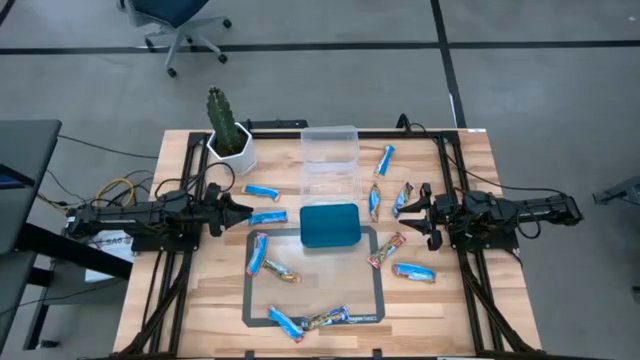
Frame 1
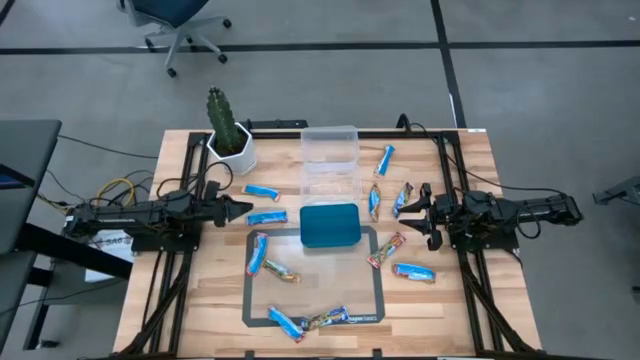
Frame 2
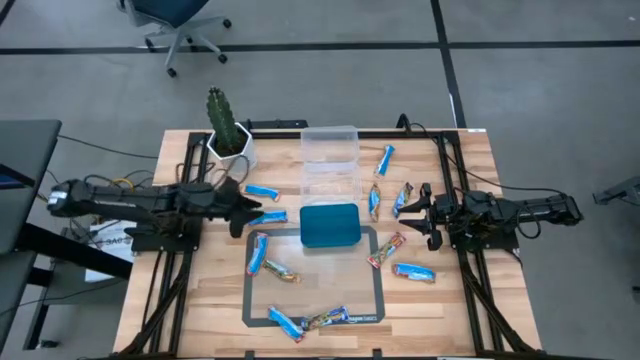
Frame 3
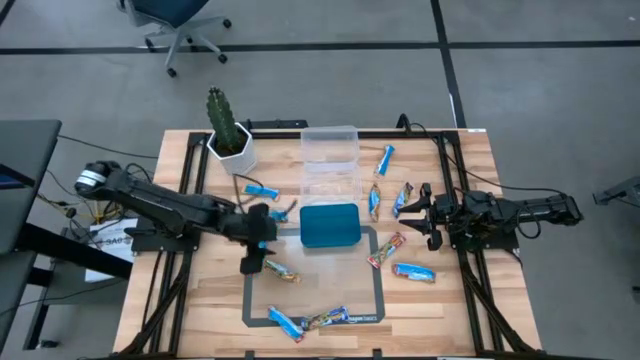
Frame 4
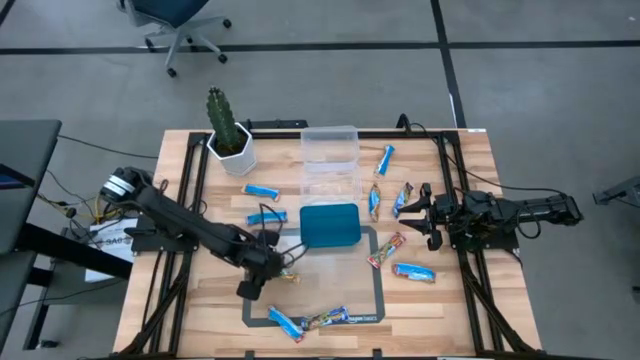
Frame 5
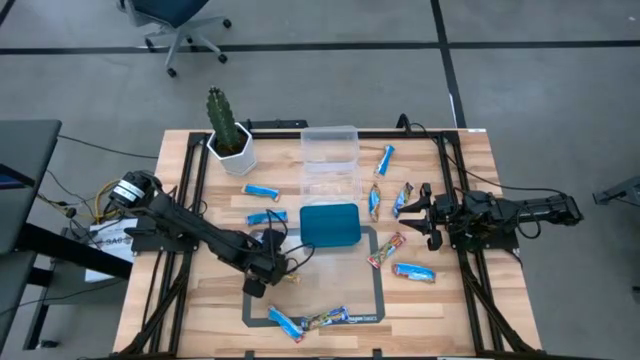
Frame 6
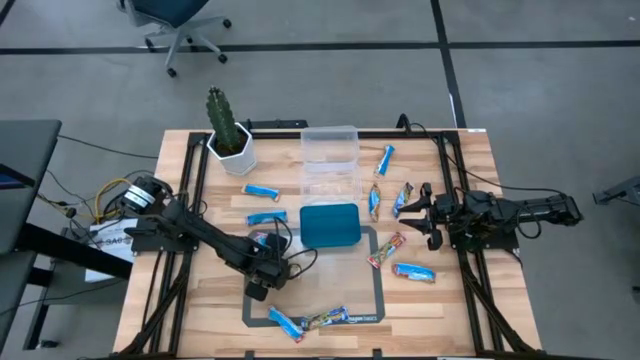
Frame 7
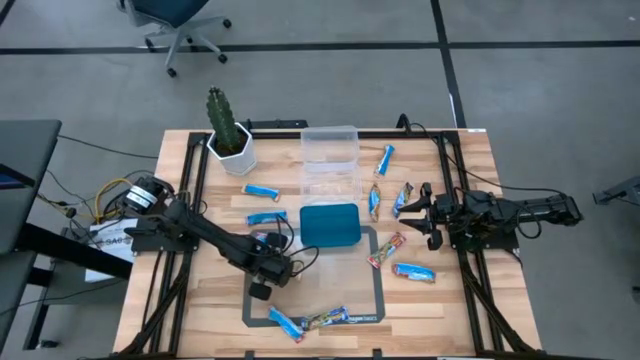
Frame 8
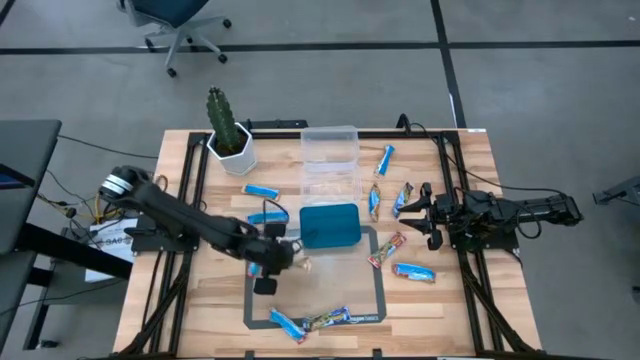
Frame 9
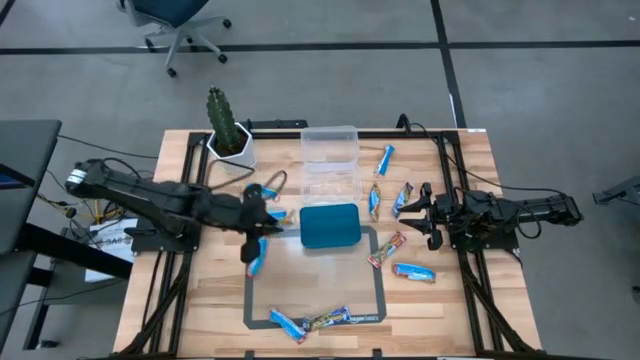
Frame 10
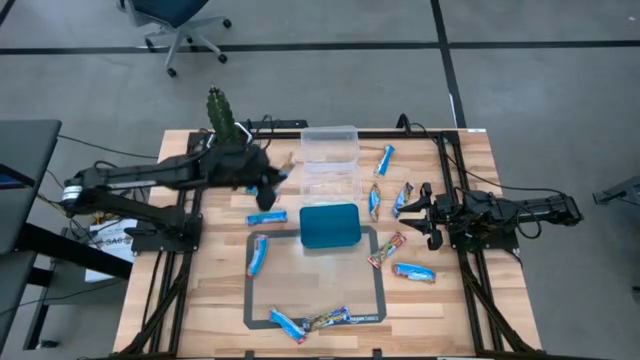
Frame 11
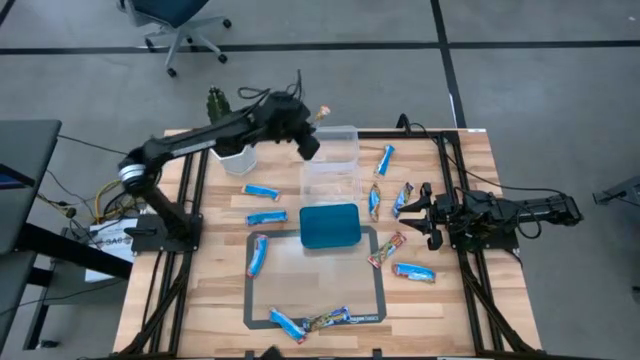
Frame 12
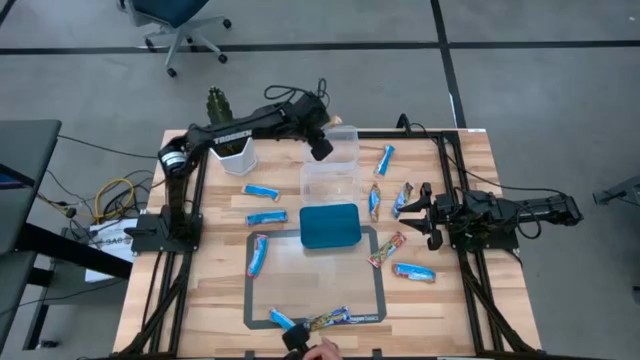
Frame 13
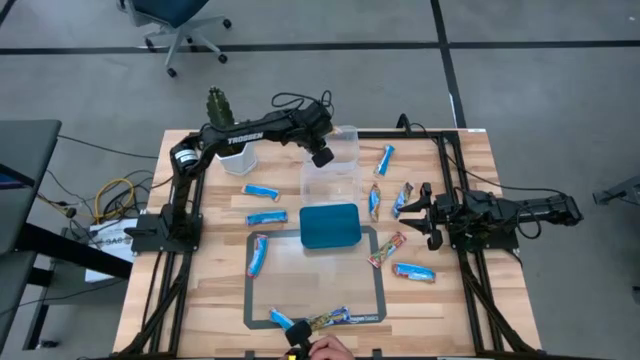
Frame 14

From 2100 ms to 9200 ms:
Task: Pick and place Granola Bars by type
Put the yellow granola bar into the top transparent bin

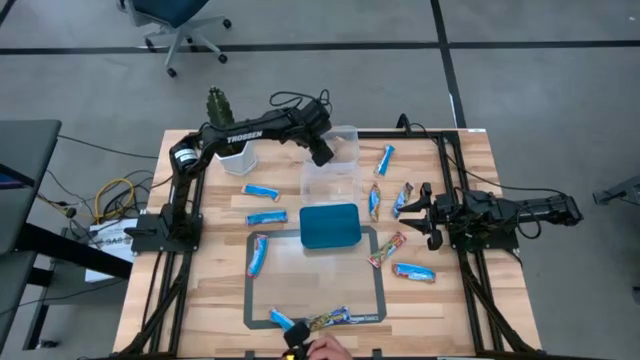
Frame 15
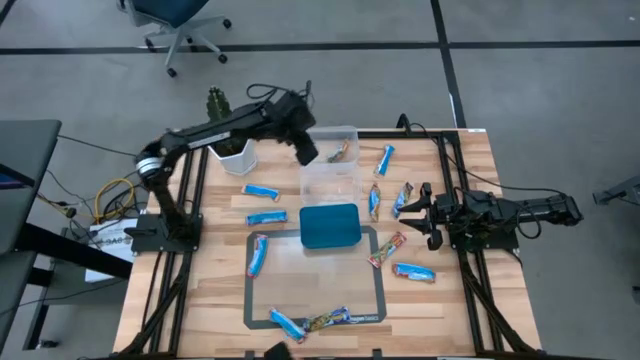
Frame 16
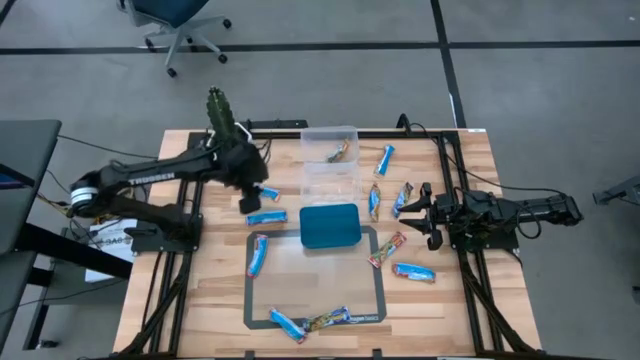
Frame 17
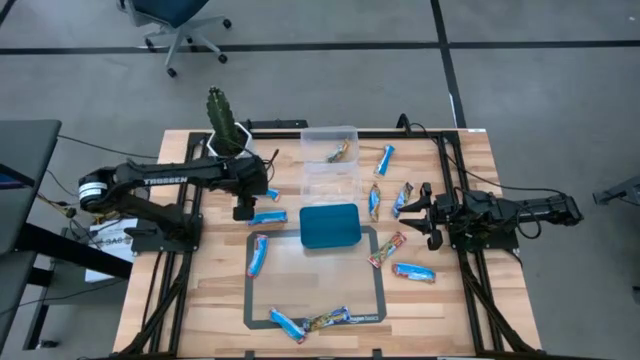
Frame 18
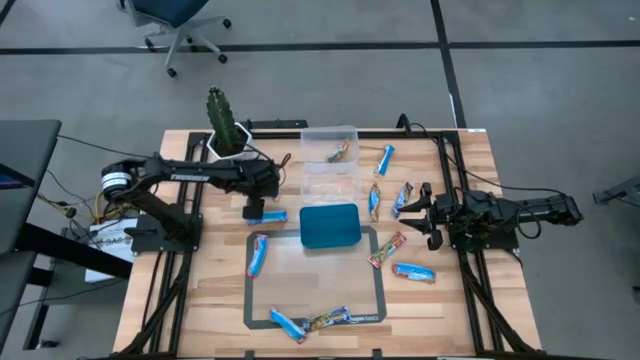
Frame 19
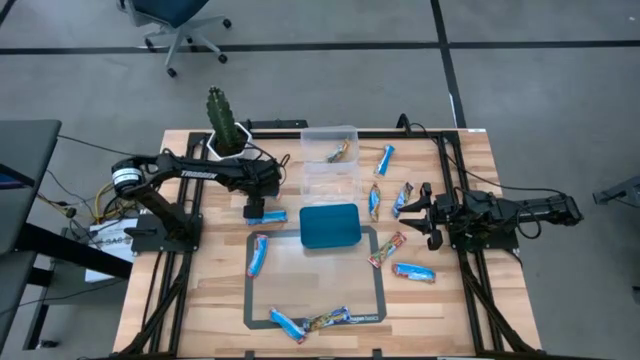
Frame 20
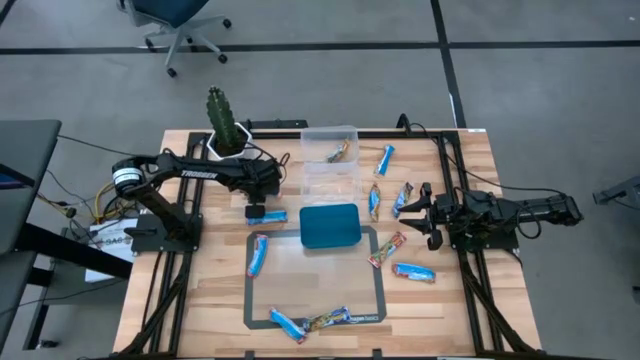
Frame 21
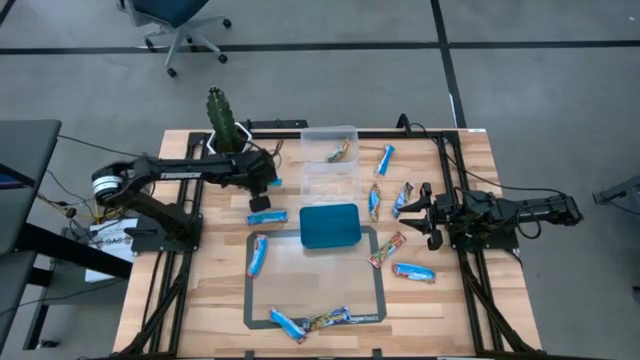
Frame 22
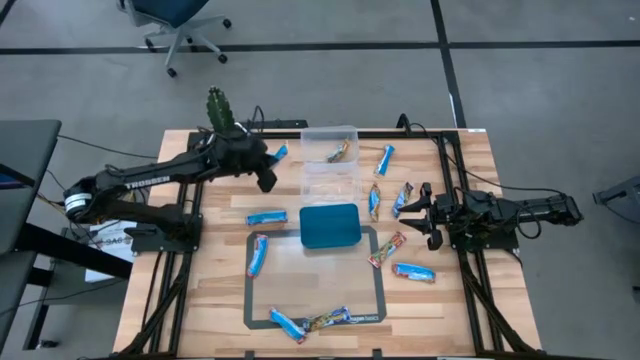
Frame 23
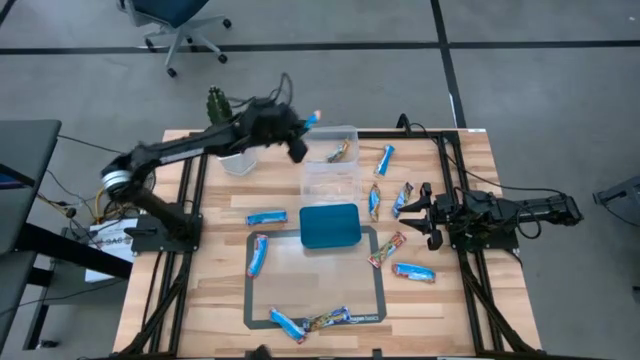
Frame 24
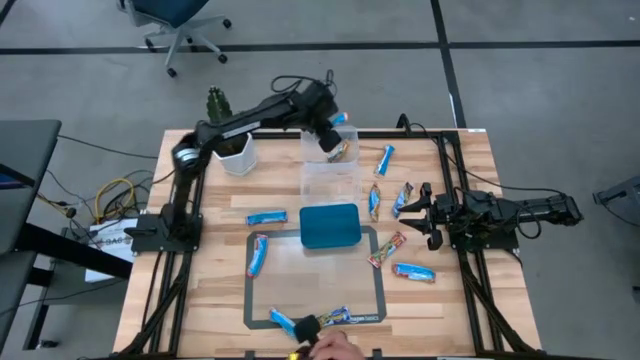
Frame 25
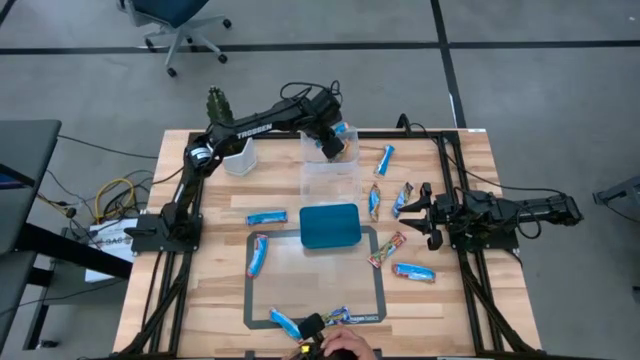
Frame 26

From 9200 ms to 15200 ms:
Put the yellow granola bar into the top transparent bin

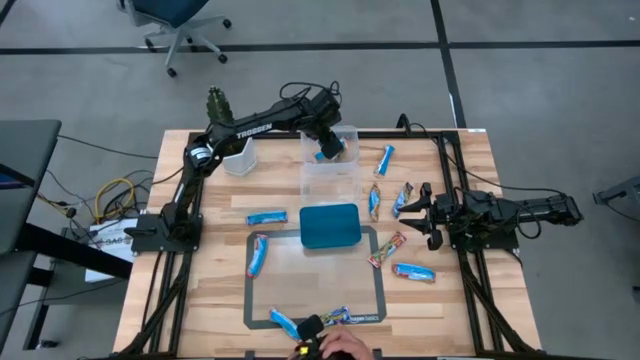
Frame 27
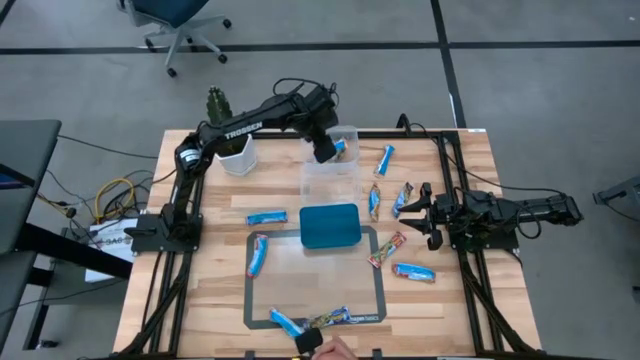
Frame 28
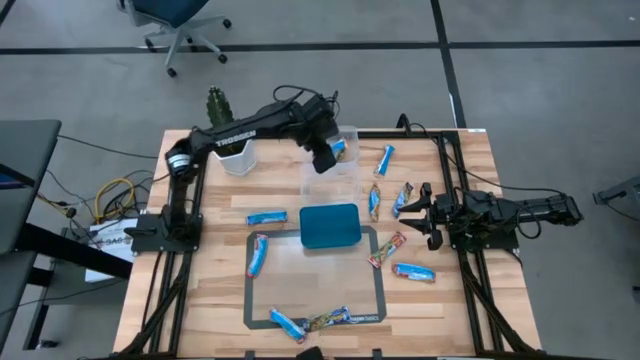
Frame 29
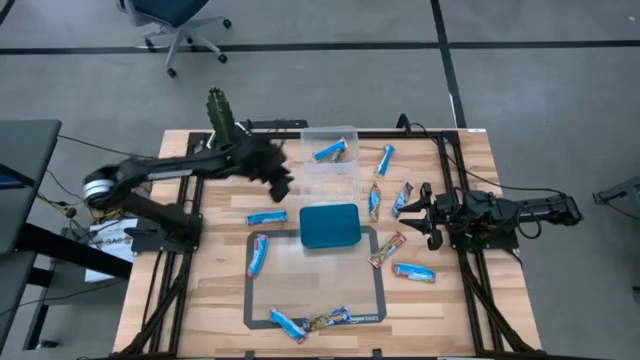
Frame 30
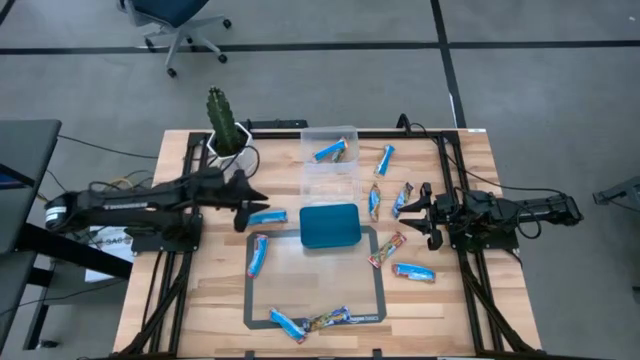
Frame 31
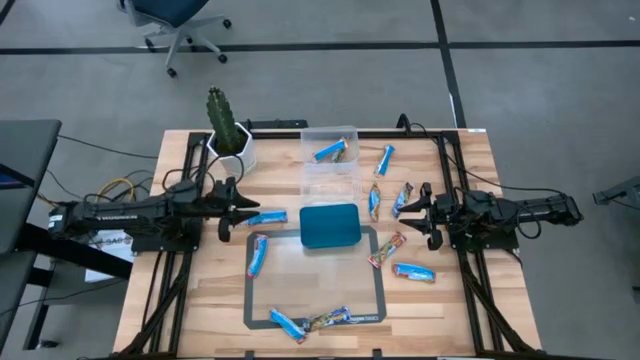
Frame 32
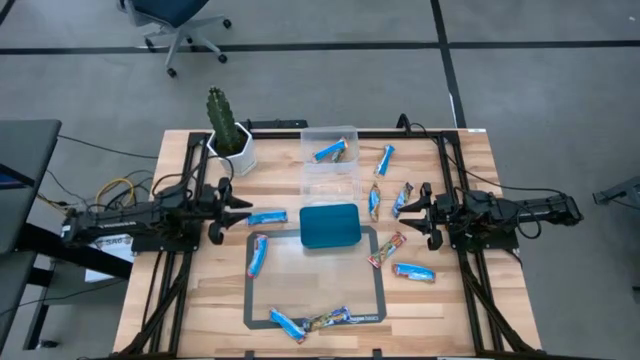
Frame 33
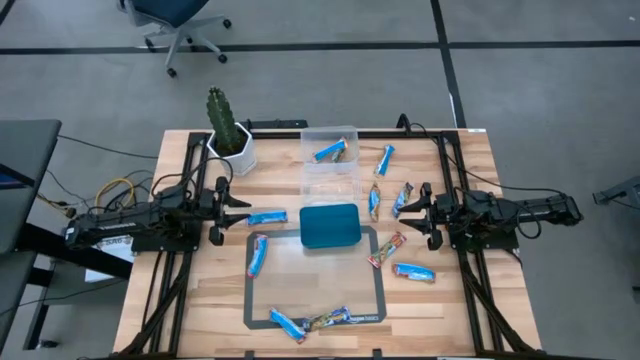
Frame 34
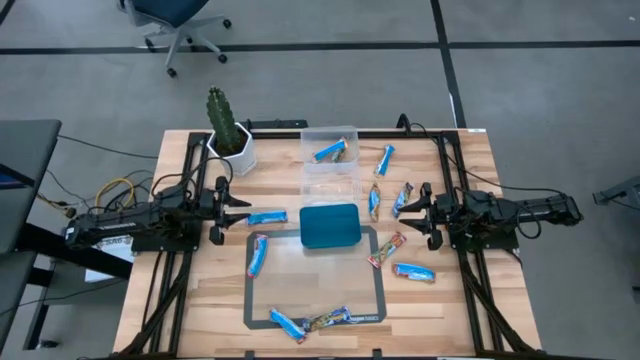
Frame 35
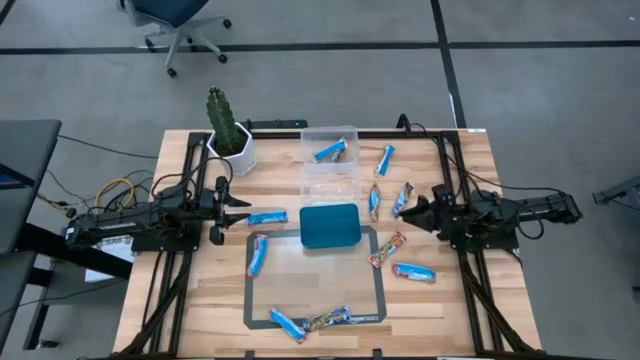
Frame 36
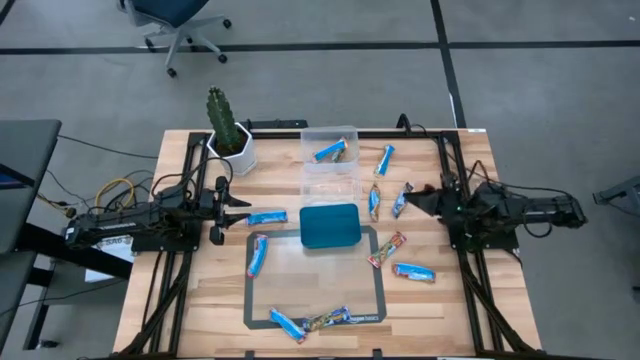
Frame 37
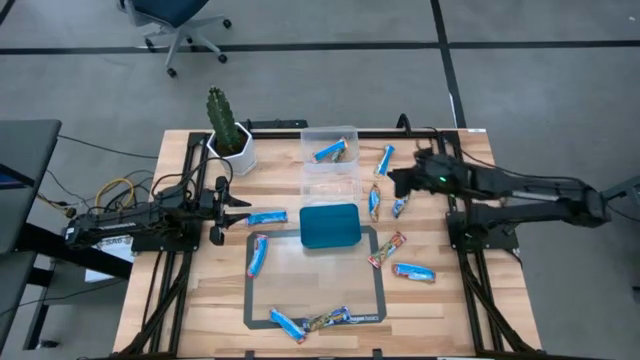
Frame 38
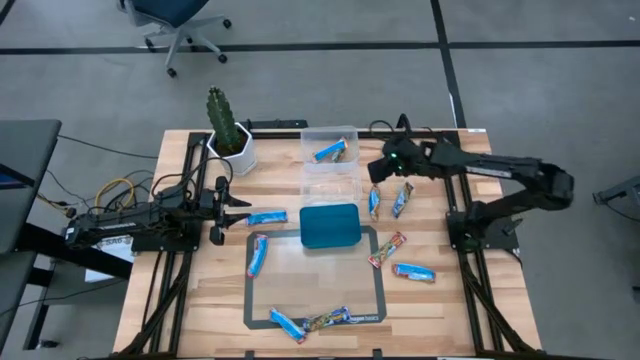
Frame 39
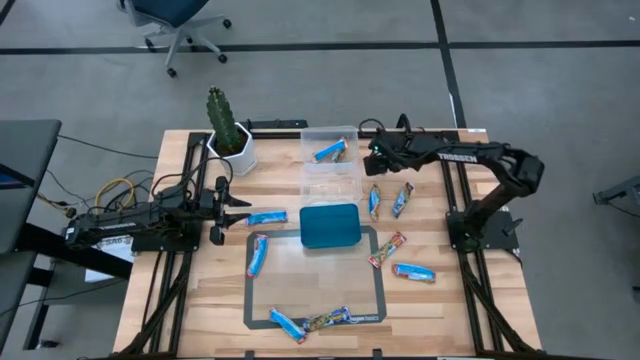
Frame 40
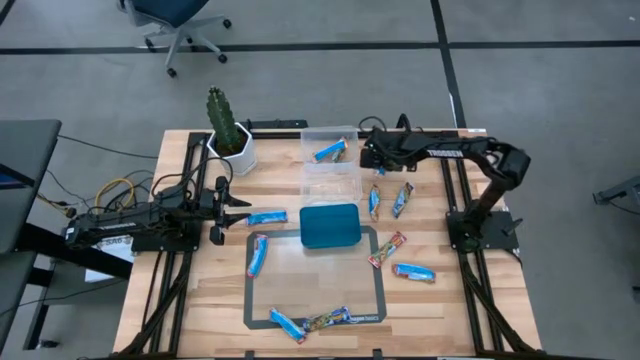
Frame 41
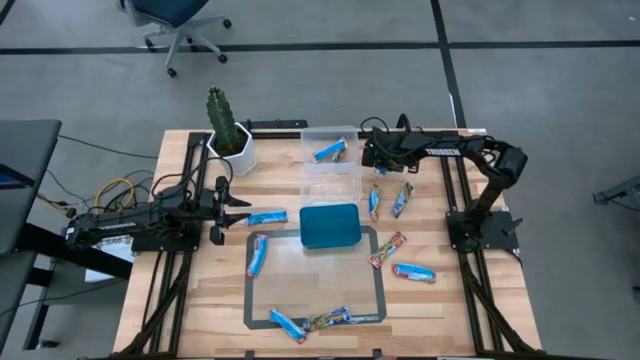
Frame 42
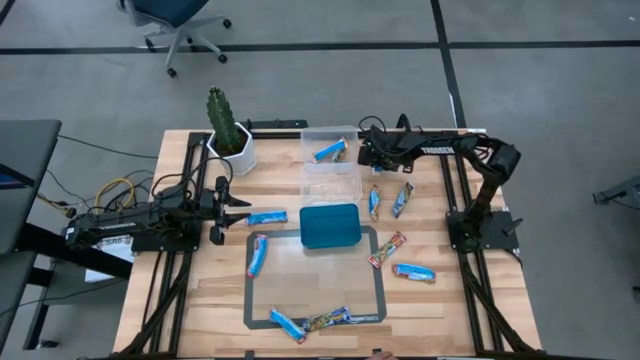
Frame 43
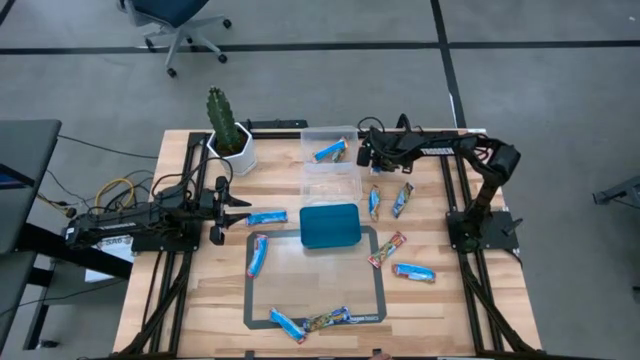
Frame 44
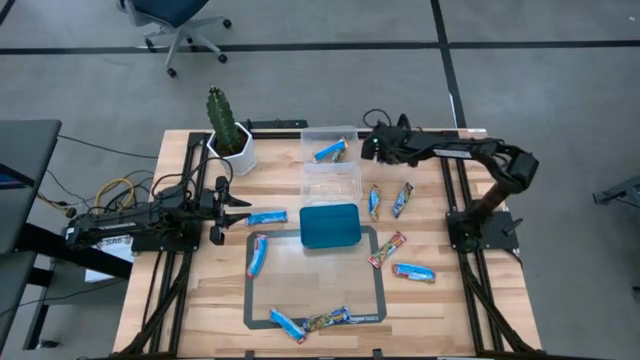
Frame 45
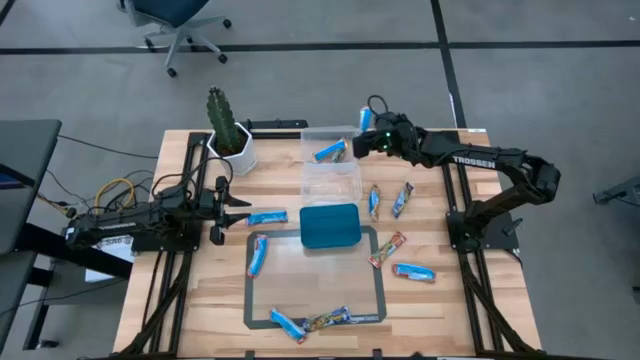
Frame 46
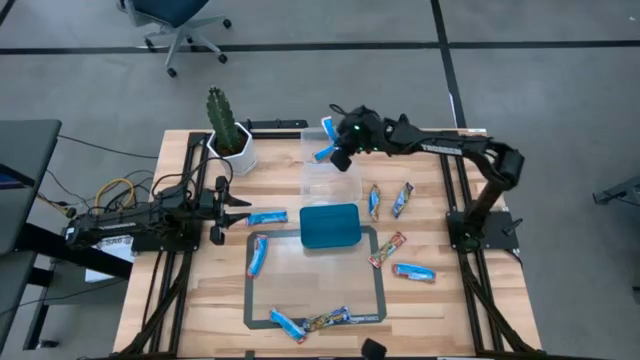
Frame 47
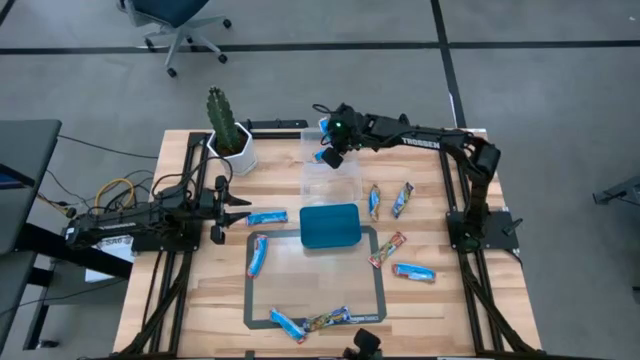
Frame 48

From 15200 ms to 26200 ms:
Put the yellow granola bar into the top transparent bin
